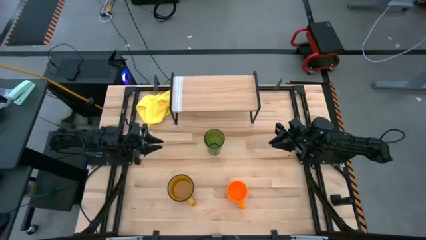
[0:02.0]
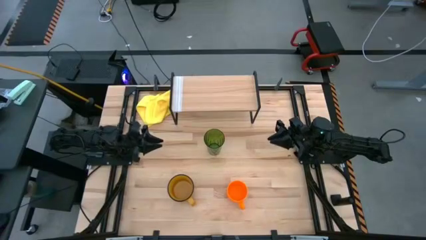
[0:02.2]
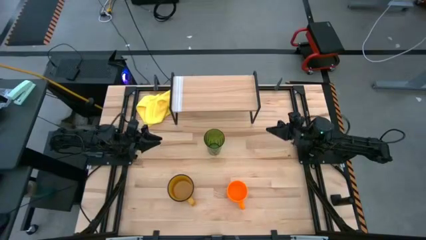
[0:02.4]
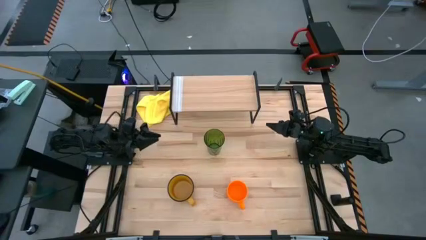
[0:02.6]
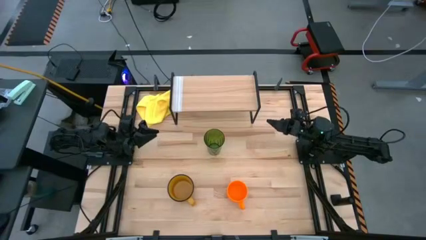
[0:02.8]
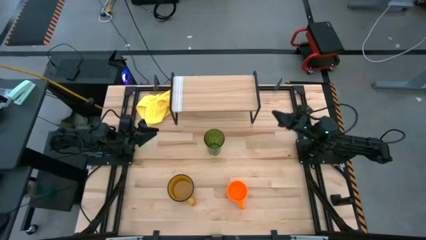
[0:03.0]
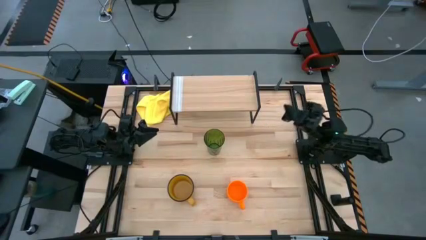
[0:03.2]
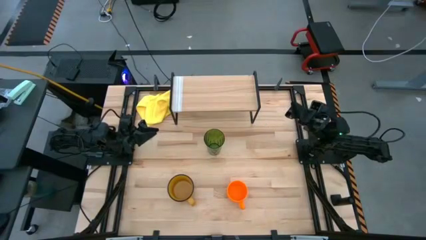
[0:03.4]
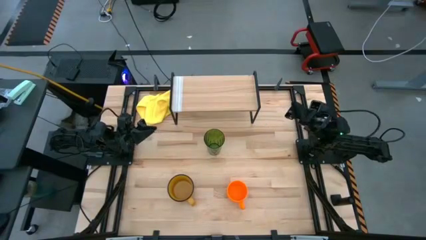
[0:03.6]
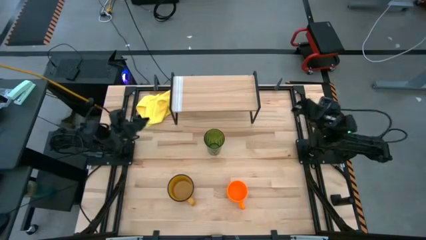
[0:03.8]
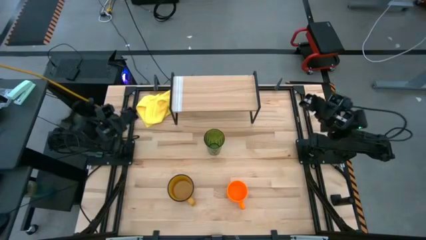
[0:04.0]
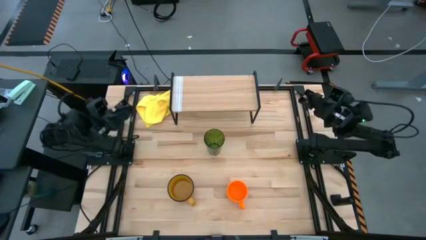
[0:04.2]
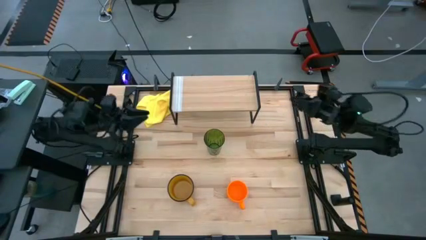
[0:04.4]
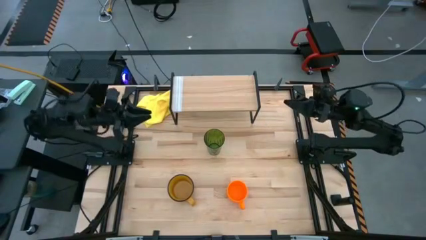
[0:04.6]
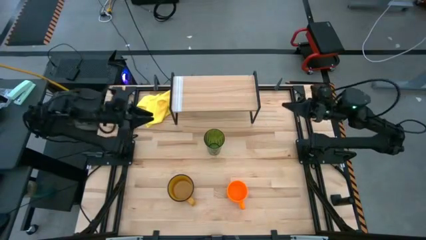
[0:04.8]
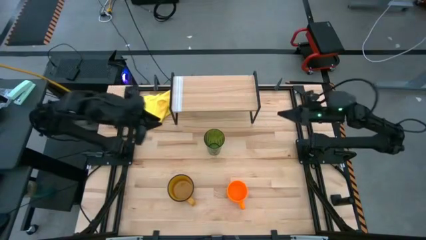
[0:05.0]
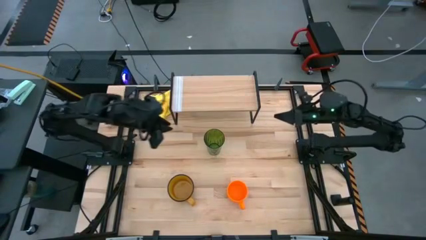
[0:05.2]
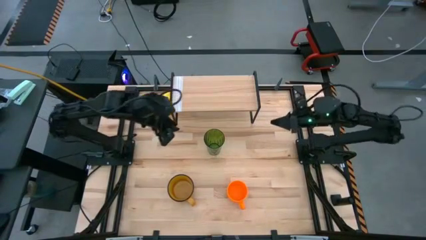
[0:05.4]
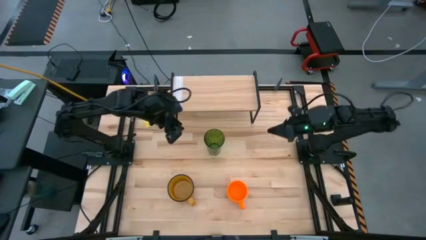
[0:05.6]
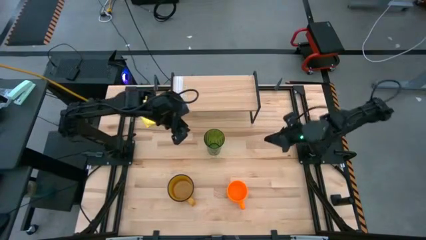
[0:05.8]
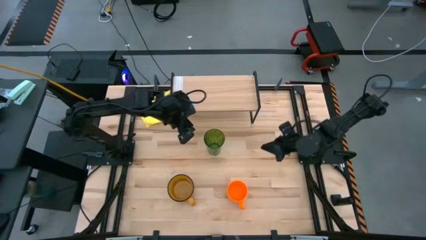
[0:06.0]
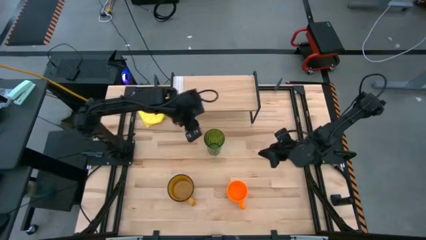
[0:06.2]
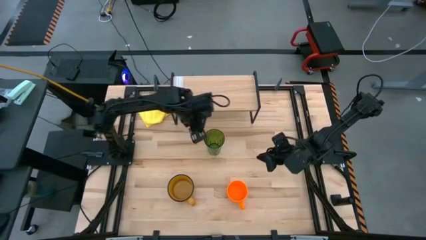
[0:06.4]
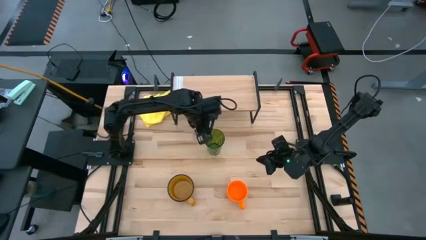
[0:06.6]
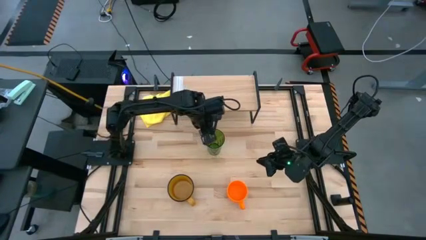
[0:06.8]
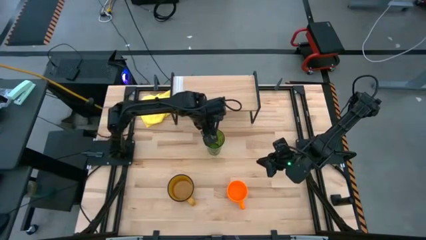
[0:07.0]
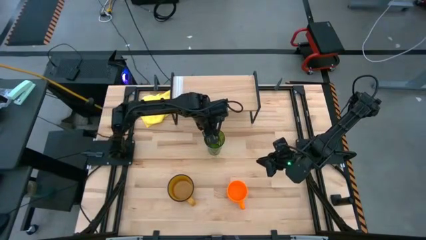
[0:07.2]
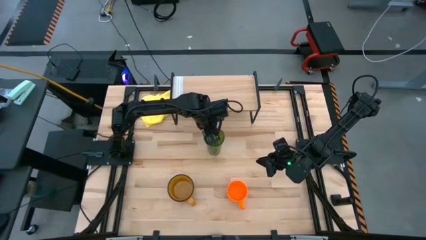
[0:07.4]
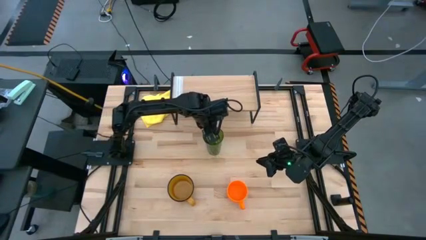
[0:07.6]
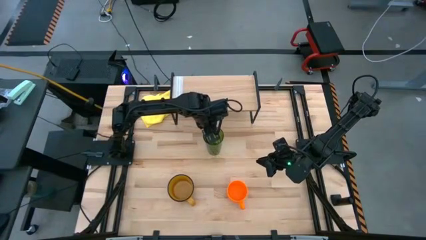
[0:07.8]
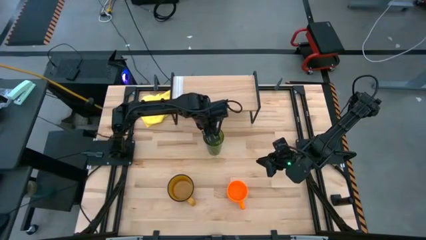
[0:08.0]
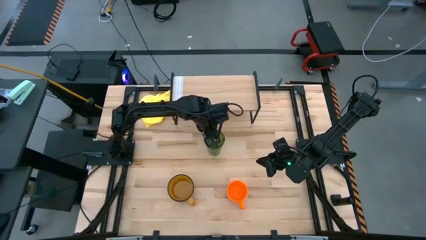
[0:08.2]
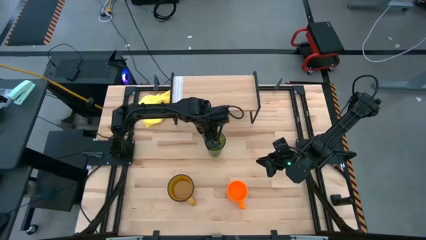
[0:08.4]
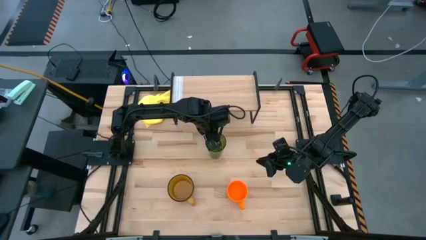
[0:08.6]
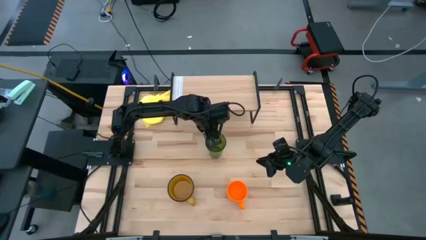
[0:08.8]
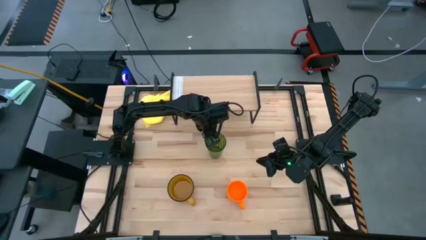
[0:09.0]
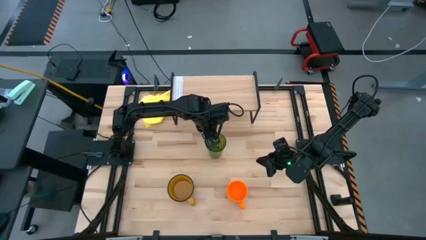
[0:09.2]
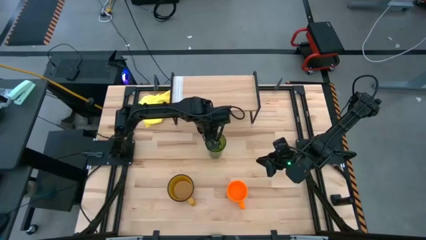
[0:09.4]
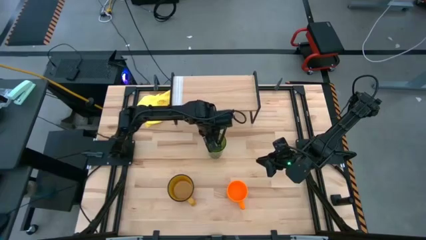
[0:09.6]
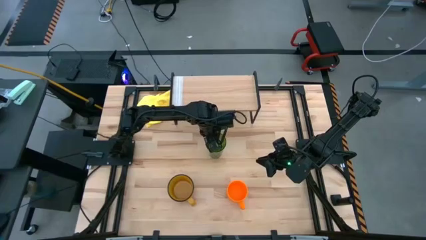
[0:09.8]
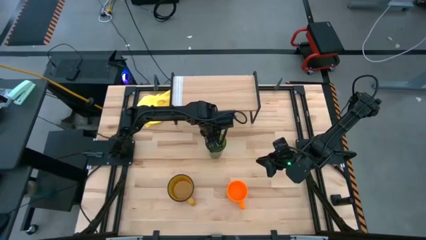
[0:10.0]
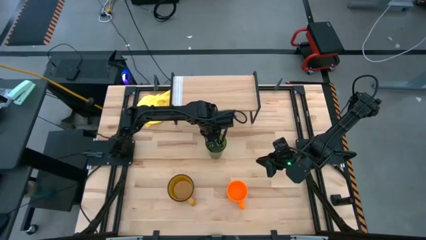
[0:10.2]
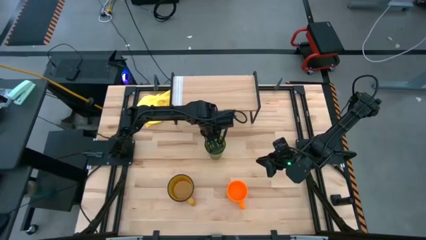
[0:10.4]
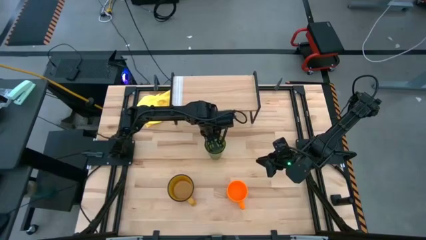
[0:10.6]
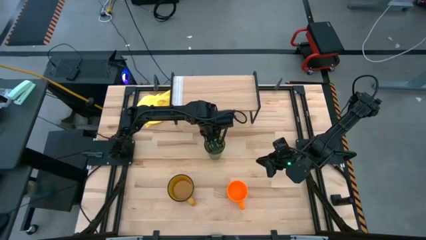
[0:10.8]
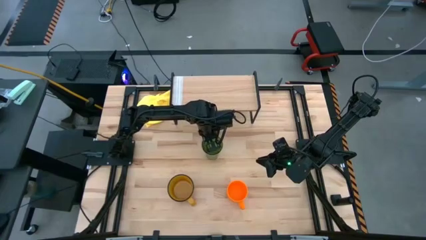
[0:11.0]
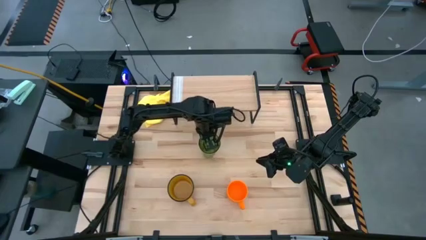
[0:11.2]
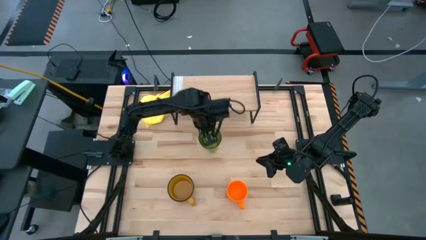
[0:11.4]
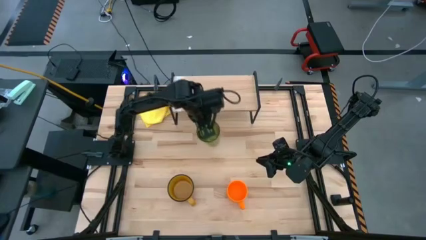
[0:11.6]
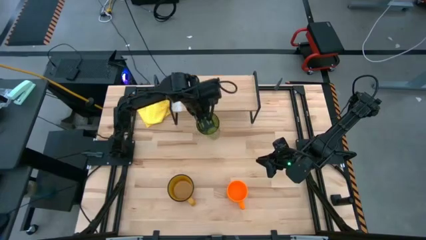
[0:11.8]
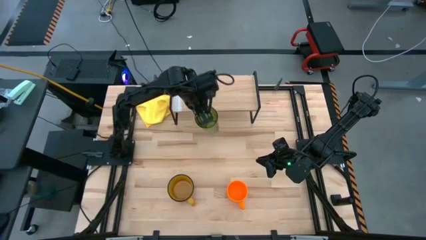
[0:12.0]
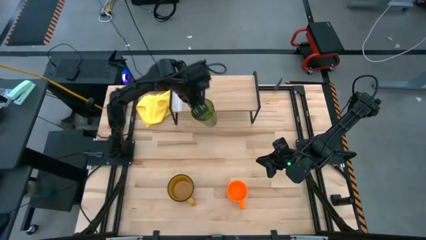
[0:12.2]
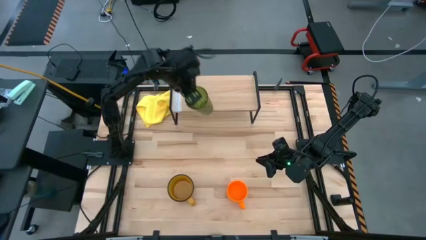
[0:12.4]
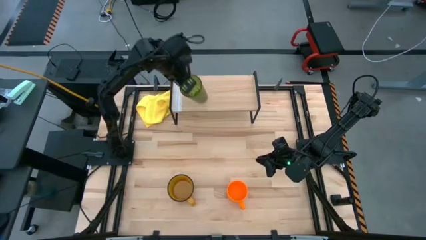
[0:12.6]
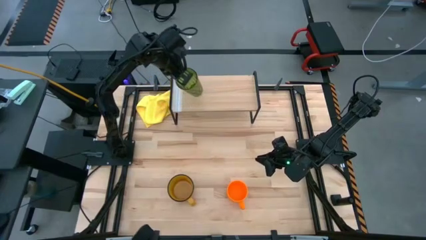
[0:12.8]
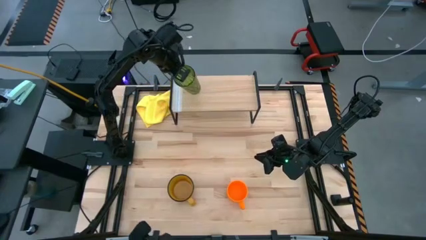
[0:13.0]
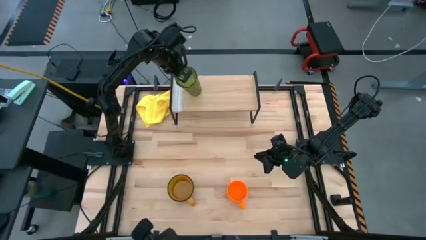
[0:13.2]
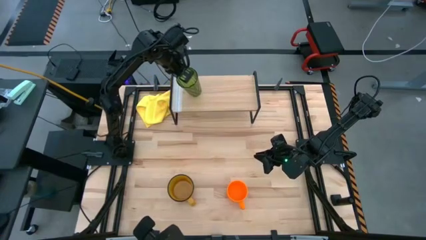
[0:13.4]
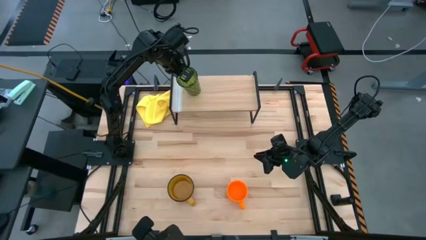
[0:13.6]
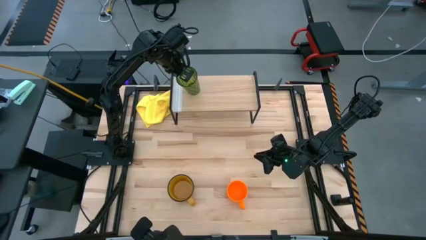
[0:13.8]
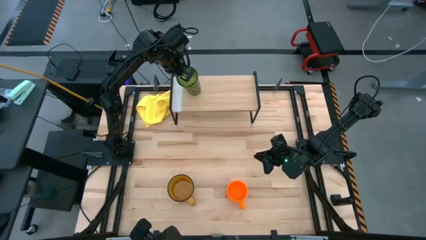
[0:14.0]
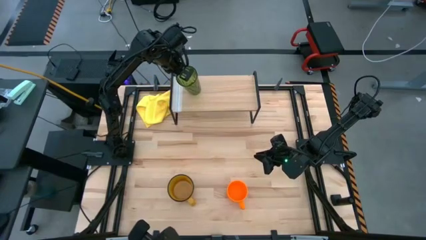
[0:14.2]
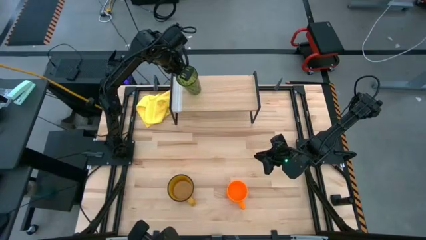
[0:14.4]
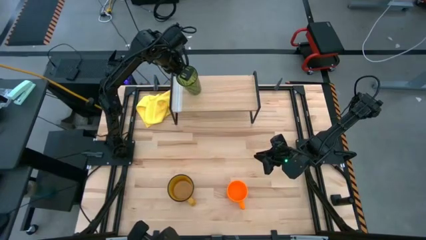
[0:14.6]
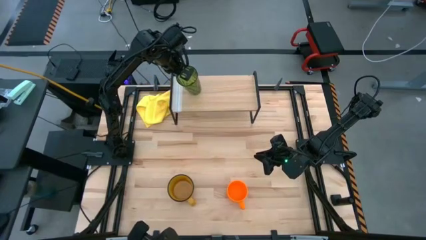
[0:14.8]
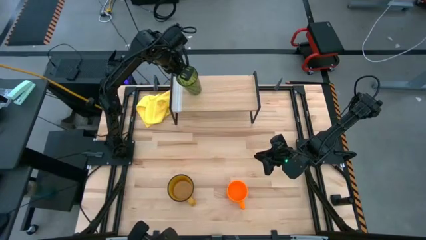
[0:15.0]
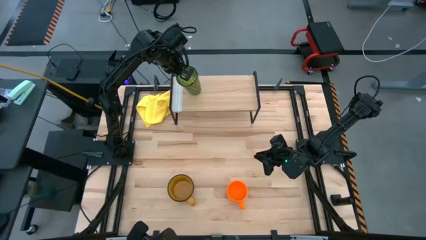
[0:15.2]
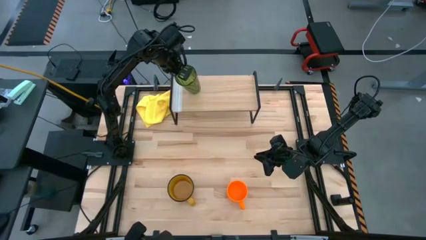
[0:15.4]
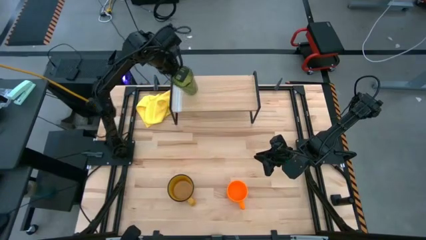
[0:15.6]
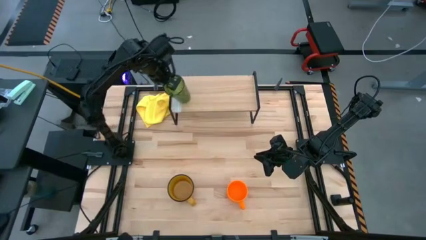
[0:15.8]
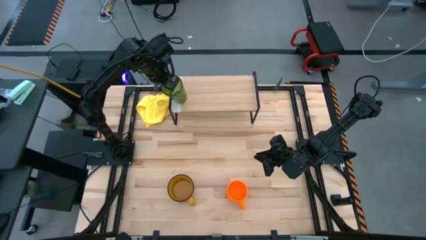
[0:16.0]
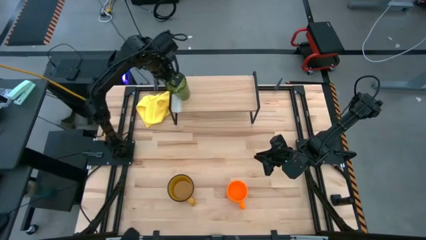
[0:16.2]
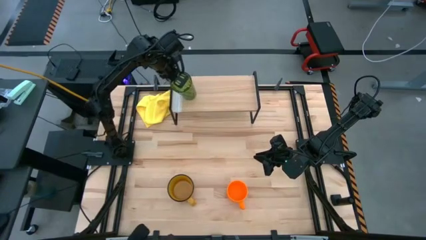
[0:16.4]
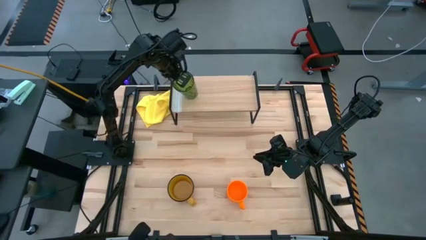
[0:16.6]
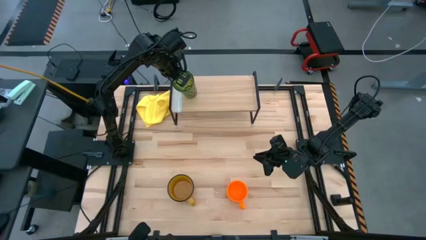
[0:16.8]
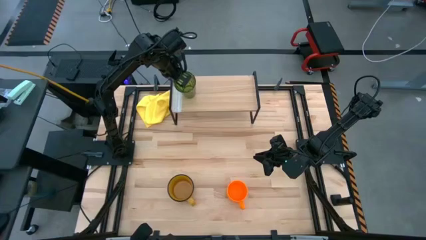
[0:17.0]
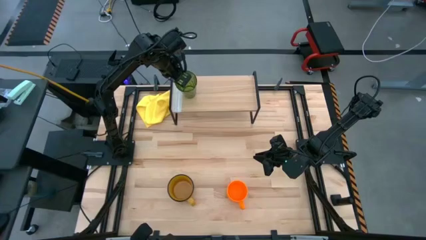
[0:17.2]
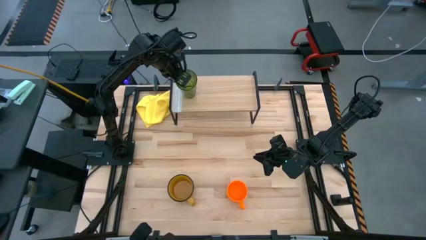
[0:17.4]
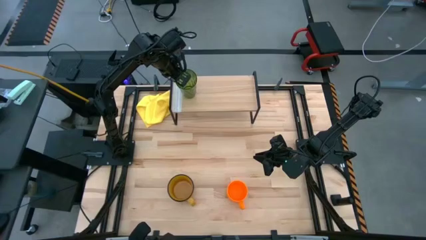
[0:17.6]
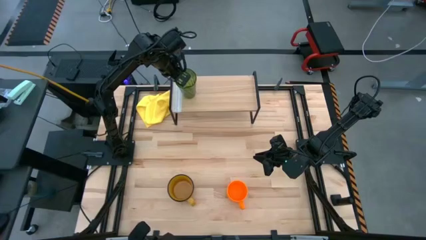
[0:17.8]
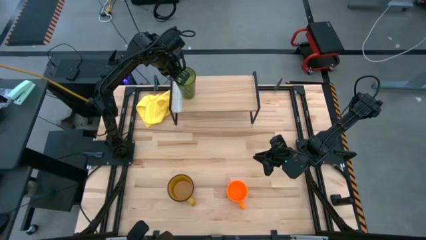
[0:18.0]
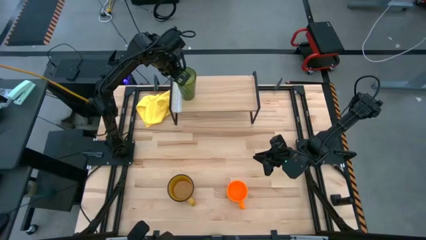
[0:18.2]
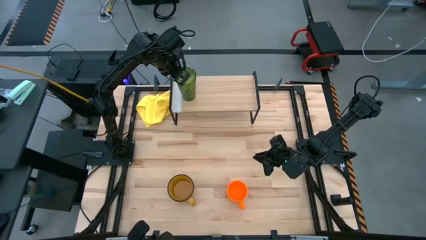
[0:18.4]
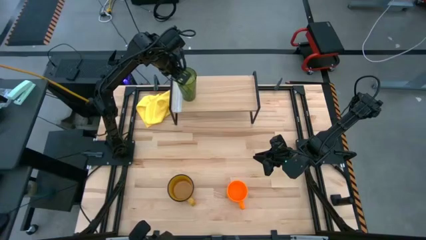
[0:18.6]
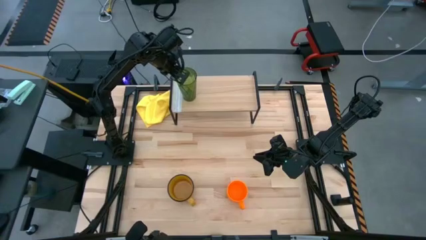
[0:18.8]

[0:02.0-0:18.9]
Task: Stack small to large cups/mugs on shelf
Put the green cup on the shelf
